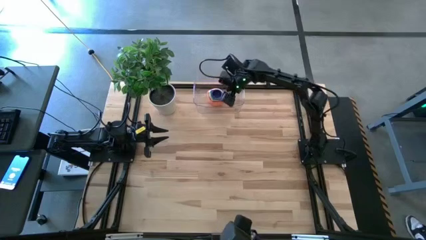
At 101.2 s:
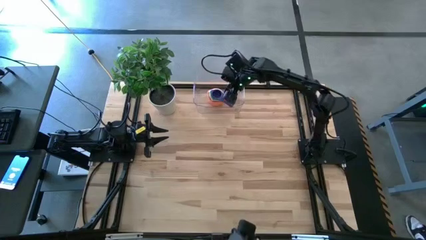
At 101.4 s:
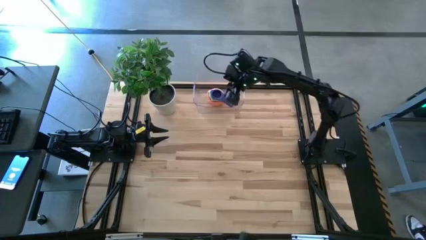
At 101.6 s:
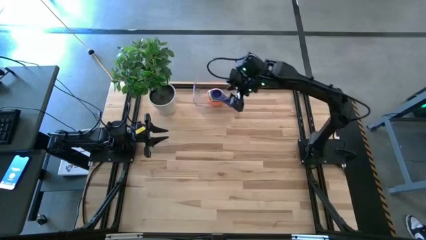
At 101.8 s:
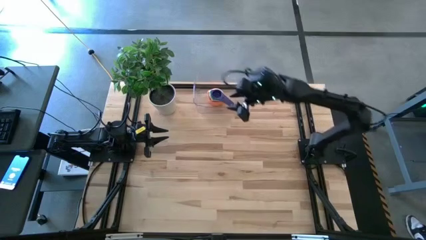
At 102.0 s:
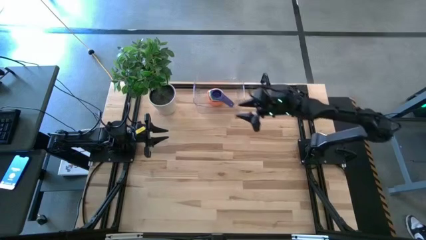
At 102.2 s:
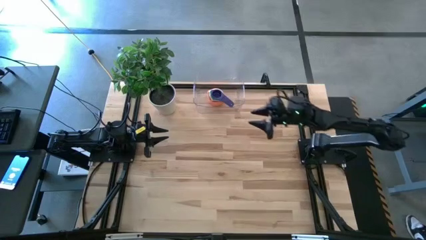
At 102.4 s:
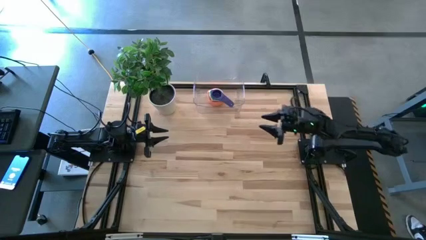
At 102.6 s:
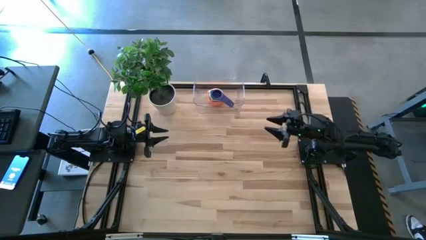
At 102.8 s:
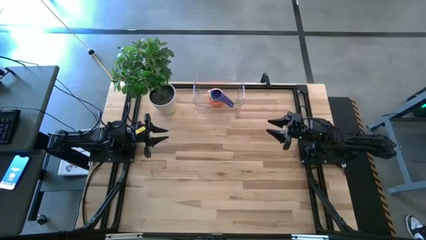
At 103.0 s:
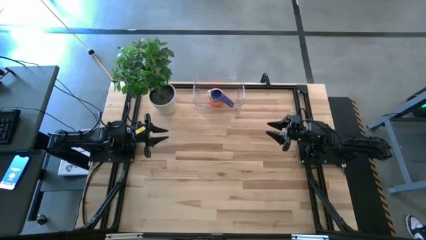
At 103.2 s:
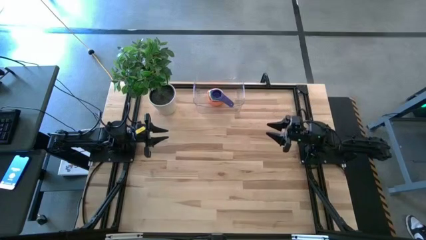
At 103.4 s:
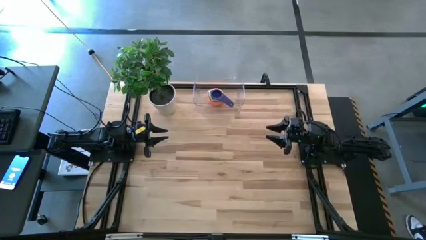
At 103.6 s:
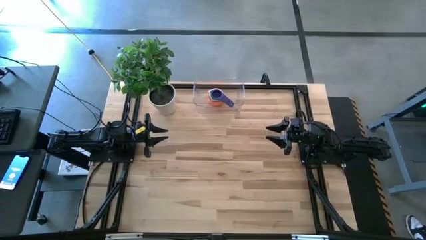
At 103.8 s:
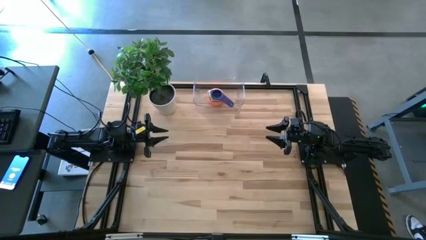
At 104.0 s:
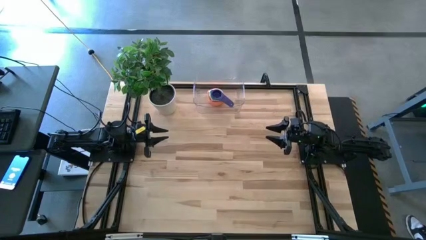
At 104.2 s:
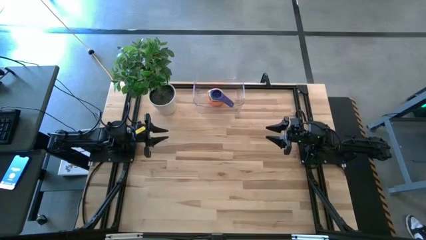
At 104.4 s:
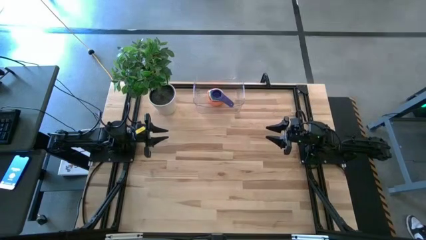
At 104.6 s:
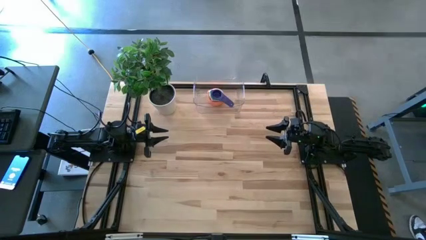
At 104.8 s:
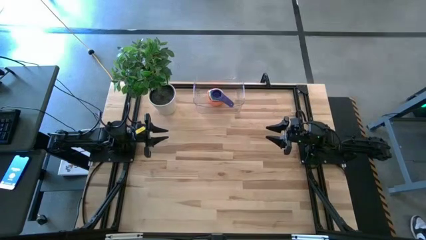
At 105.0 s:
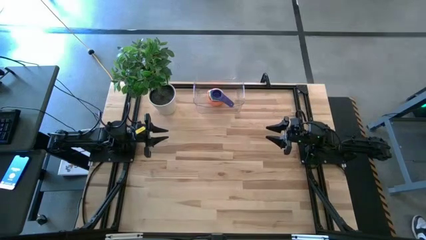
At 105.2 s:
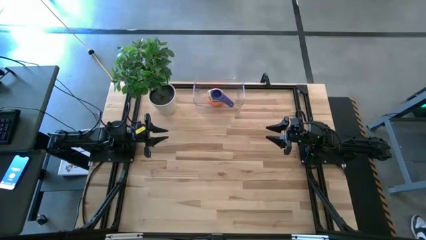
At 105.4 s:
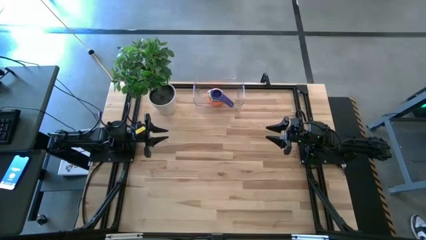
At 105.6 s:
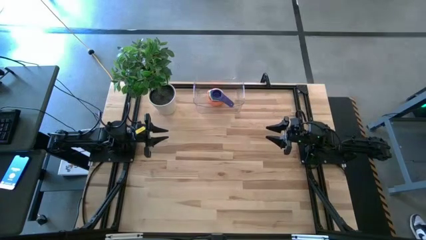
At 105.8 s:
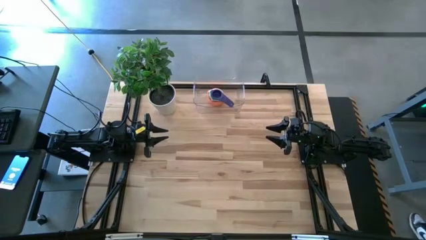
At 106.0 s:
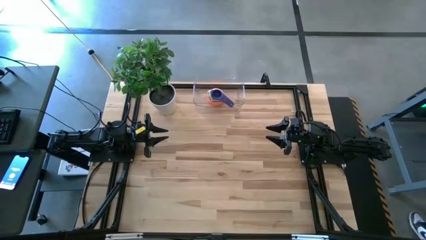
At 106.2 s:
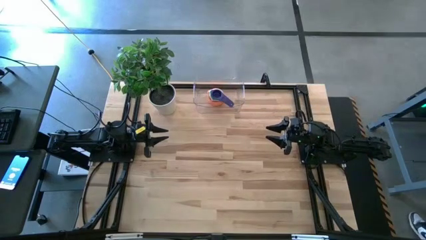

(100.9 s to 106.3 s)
Task: Nest measuring cups in basket
Return to Home Position

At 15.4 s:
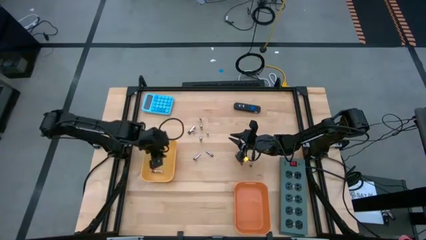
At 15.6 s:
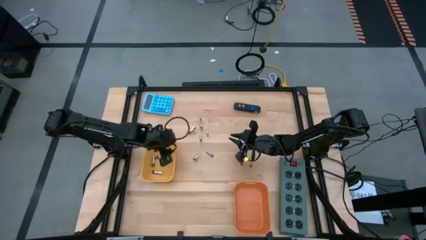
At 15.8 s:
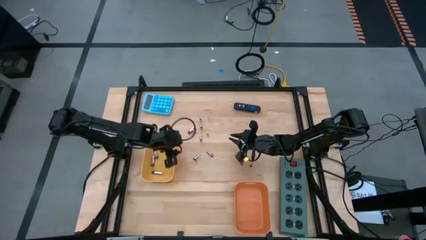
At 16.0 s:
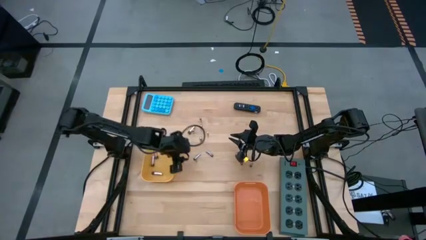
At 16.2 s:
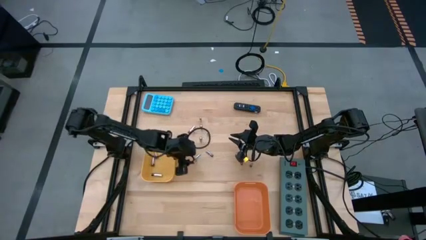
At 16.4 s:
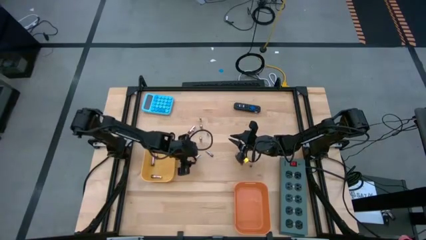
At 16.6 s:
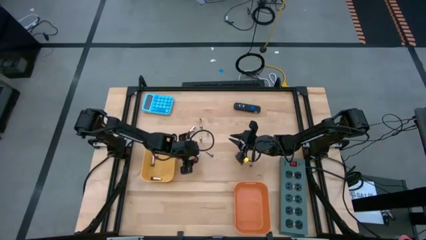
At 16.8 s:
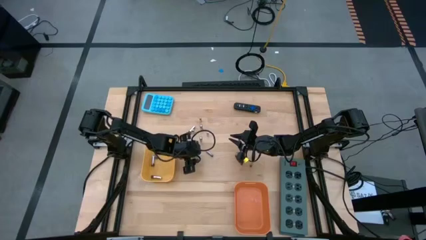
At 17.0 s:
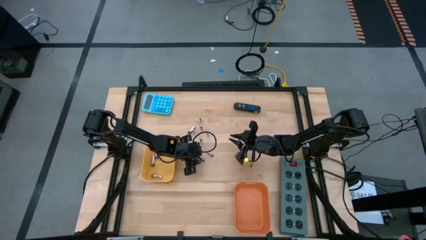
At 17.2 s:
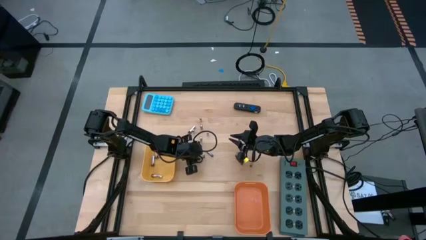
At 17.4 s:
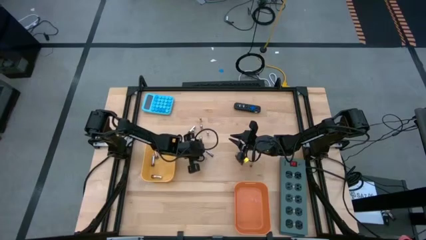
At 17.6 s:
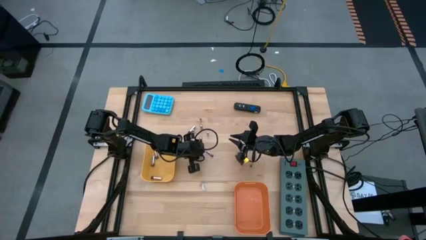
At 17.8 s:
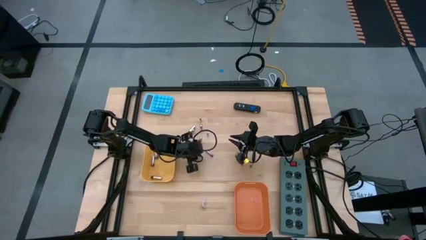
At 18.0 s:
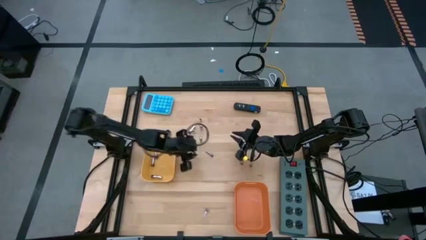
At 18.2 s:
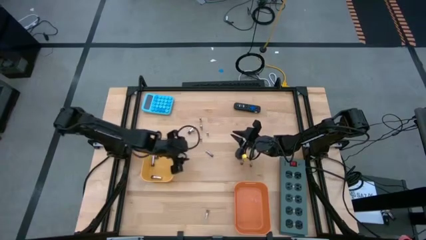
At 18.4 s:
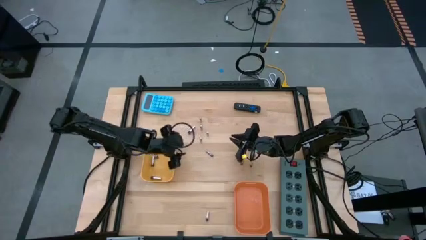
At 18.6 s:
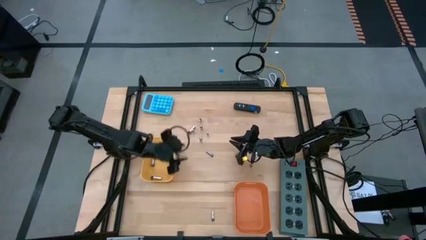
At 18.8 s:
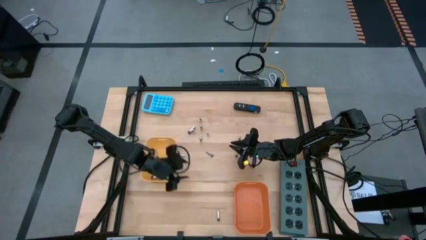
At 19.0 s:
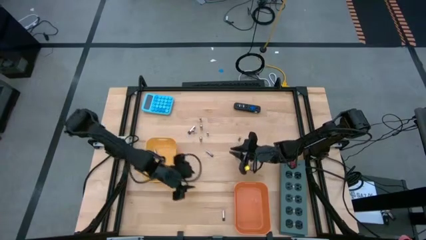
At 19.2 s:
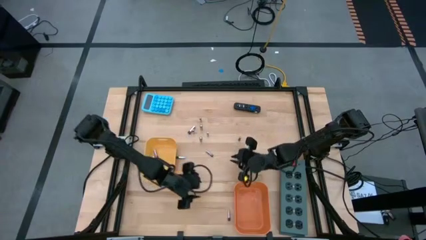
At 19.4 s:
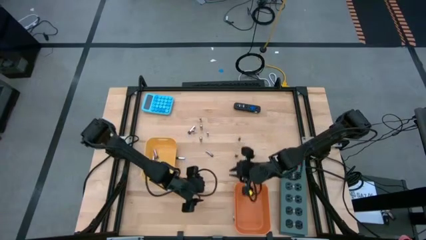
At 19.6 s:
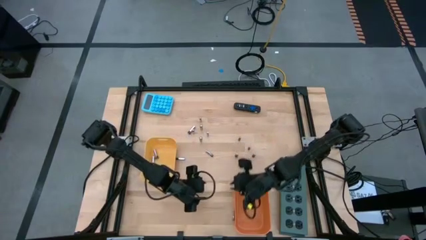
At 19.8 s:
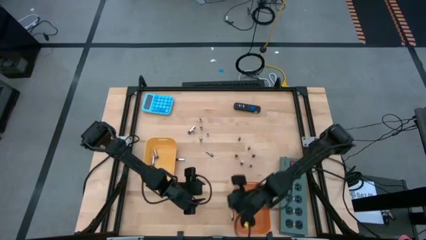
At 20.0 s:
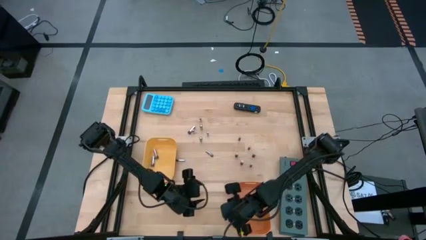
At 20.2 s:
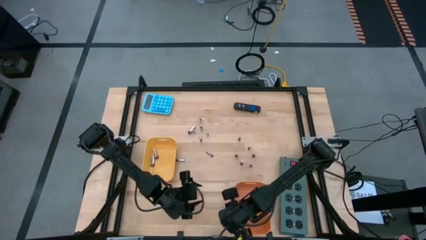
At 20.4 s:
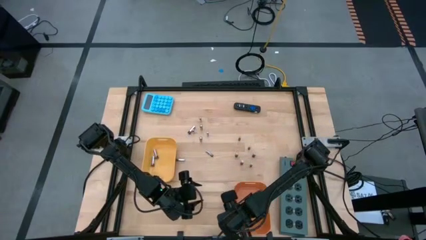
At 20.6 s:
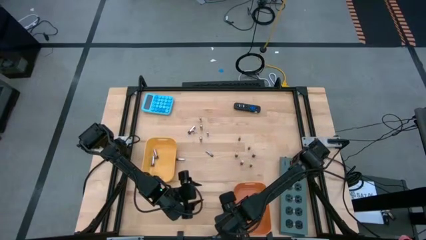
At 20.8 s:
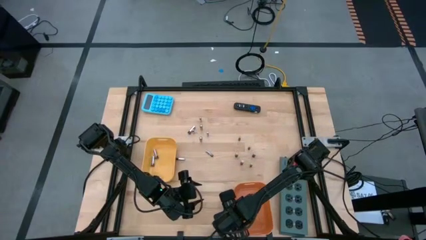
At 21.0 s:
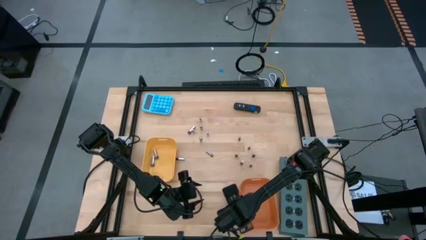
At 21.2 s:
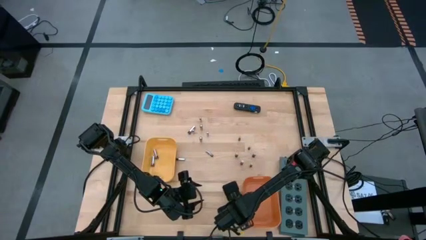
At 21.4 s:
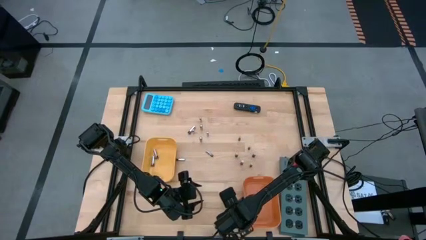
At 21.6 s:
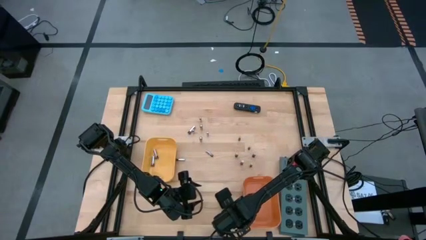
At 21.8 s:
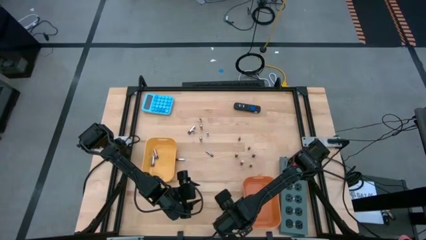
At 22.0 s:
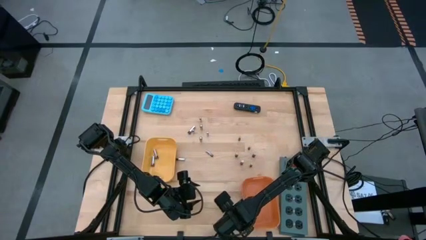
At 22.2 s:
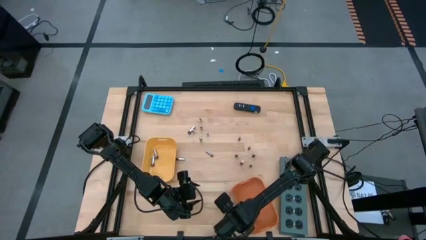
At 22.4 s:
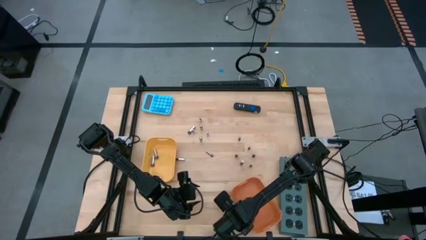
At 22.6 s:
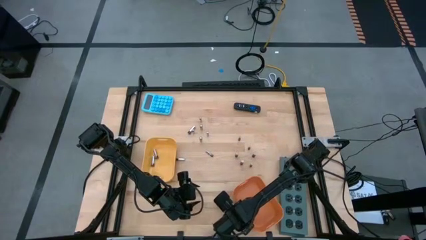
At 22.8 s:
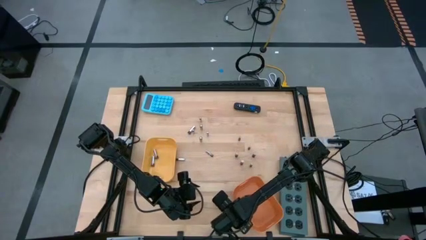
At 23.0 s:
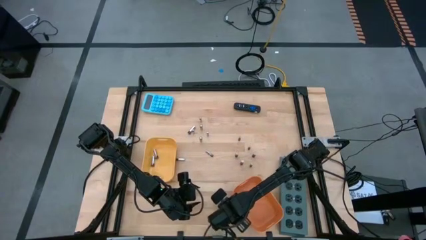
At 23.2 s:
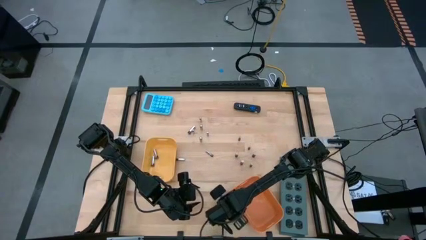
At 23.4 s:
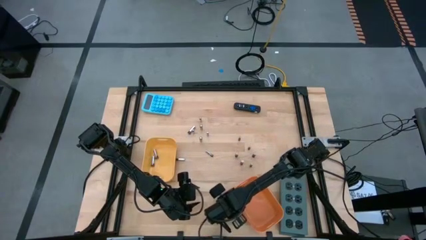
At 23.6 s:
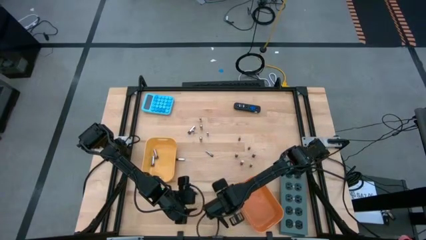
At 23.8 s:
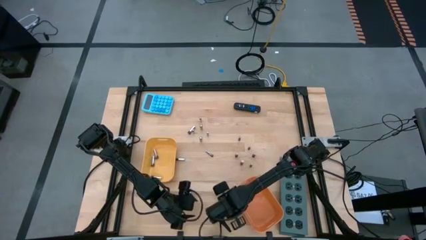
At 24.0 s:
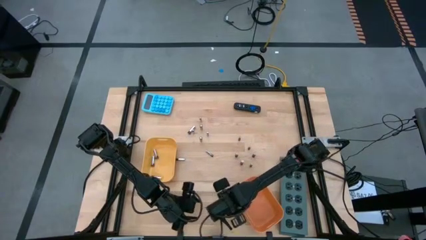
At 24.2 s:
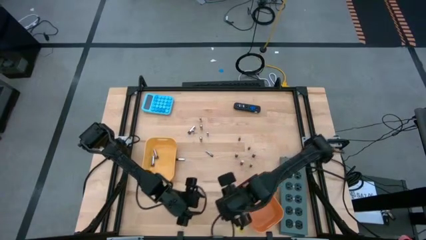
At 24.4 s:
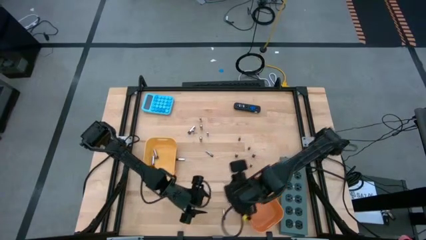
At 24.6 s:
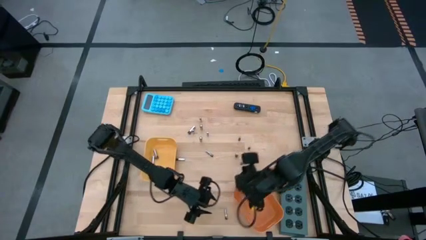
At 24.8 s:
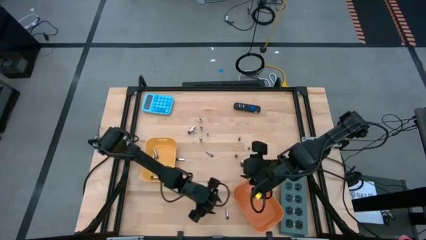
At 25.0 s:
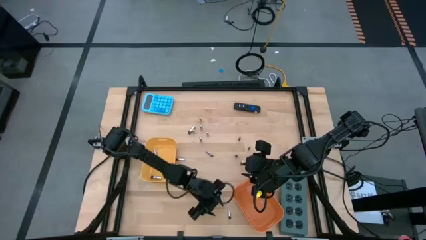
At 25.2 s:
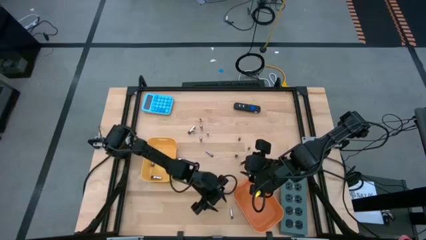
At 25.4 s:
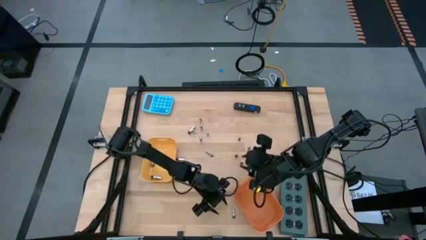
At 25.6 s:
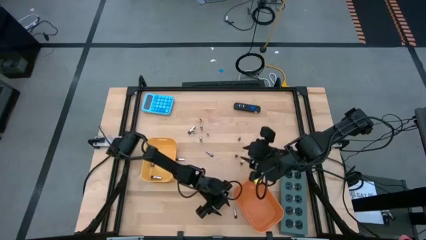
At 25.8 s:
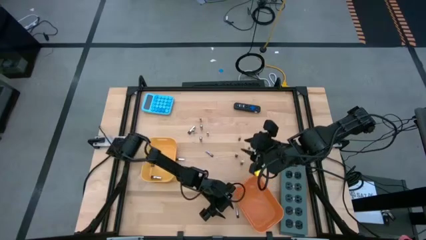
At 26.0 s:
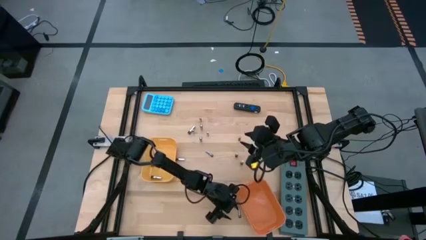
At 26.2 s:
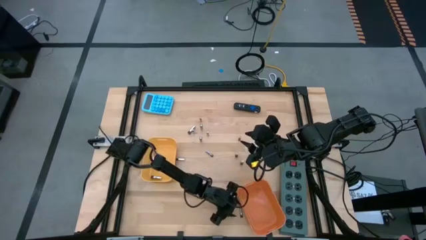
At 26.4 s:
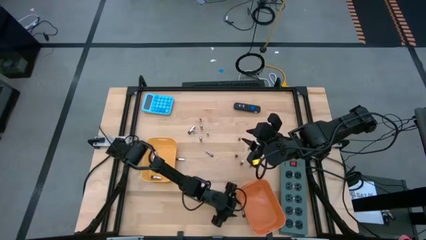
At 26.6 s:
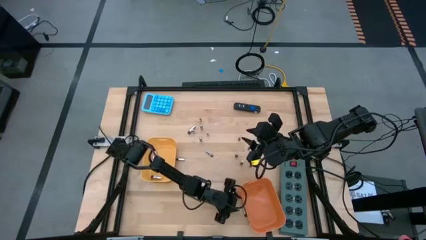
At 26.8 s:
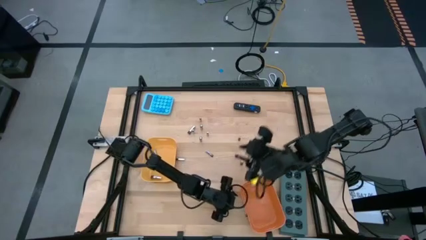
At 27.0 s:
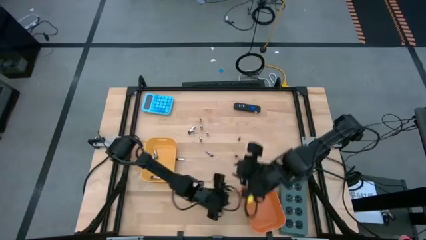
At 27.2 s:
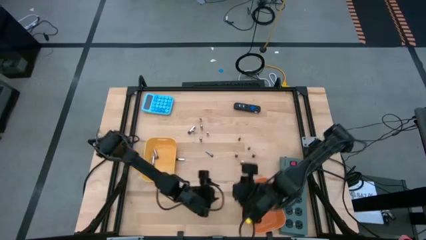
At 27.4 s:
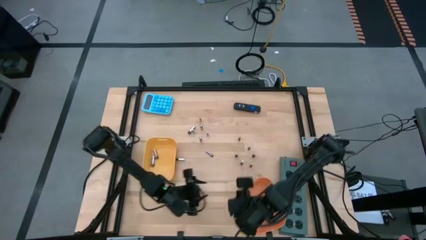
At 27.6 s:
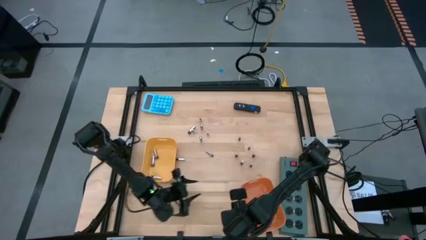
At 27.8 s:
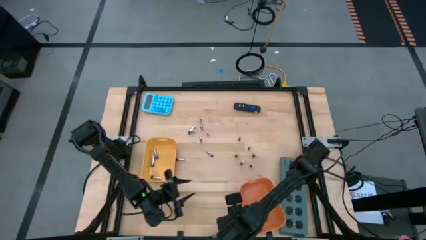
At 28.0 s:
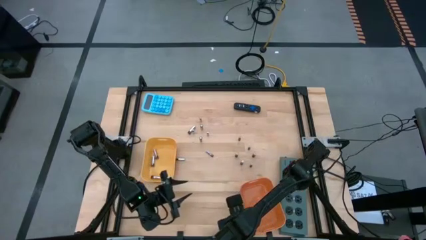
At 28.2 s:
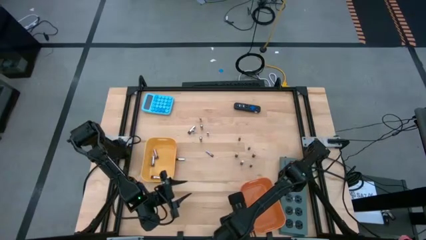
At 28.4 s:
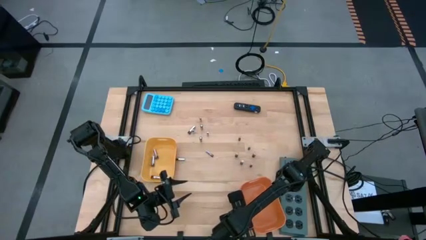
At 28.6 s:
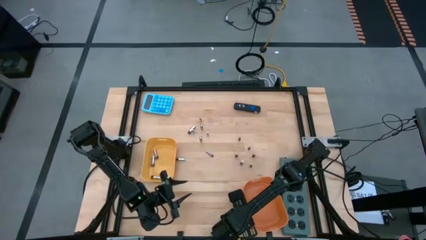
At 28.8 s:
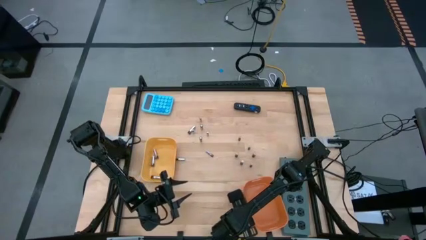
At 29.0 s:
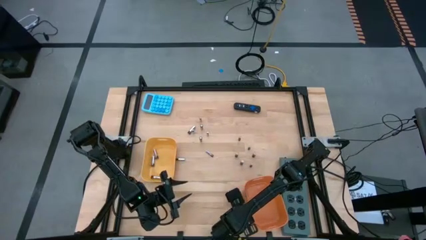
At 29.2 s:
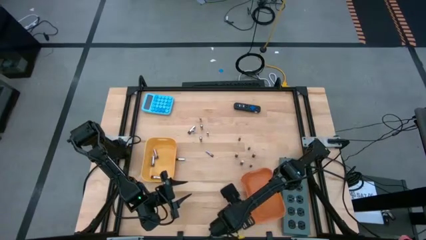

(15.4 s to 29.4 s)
Task: Sort batteries
Put the silver battery into the yellow bin
